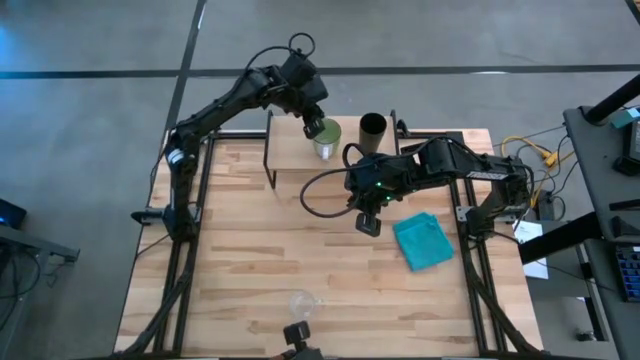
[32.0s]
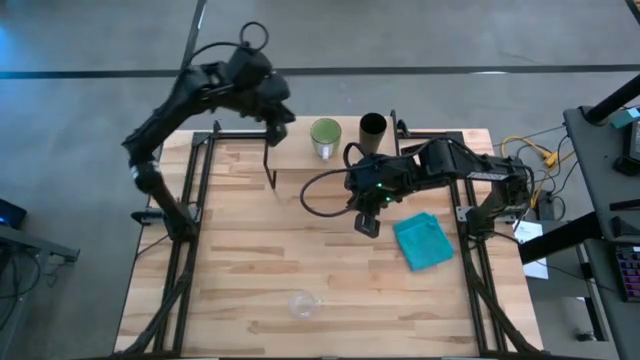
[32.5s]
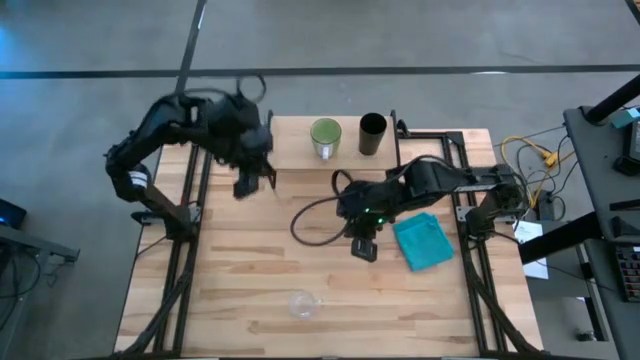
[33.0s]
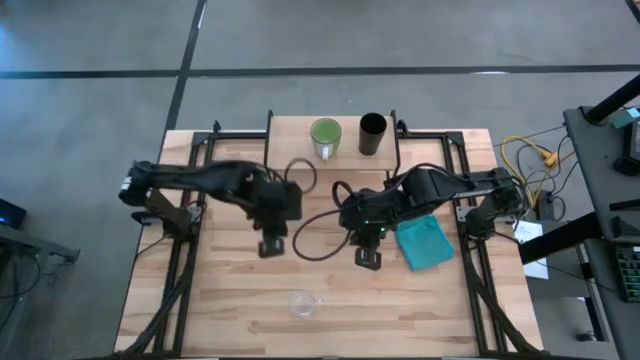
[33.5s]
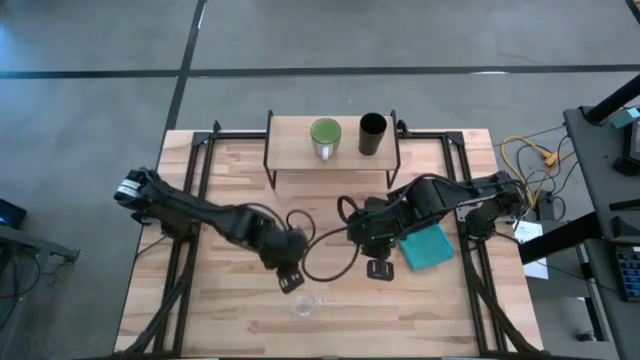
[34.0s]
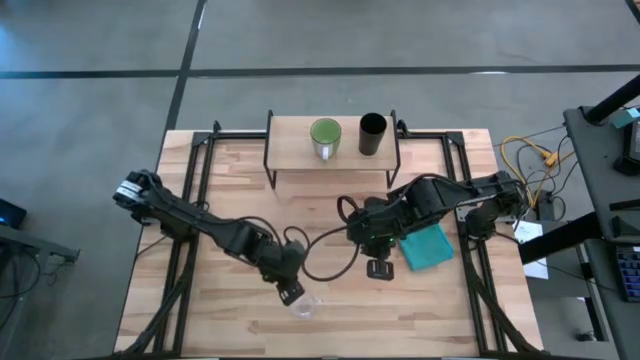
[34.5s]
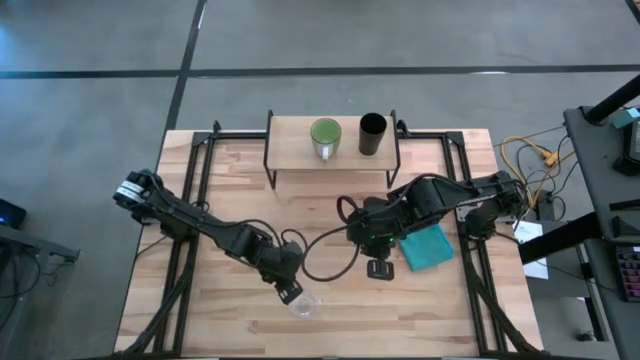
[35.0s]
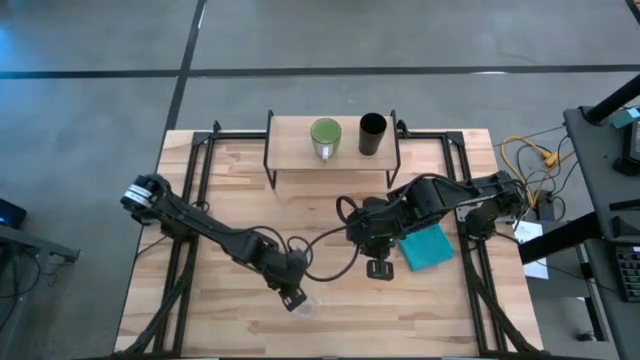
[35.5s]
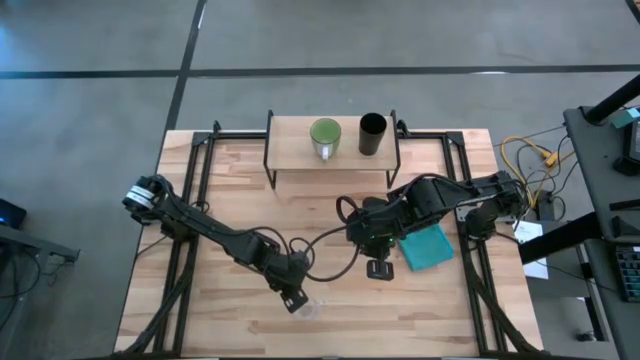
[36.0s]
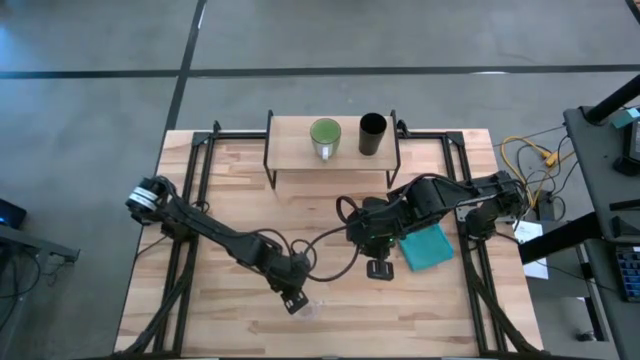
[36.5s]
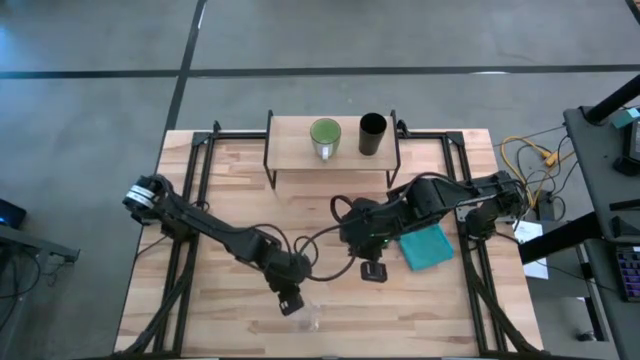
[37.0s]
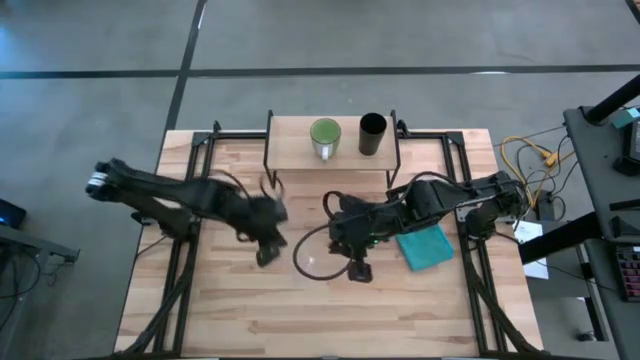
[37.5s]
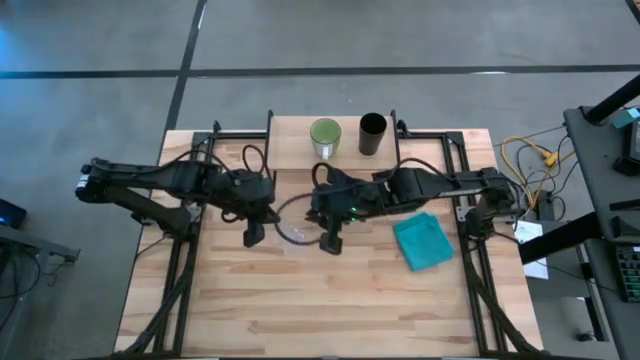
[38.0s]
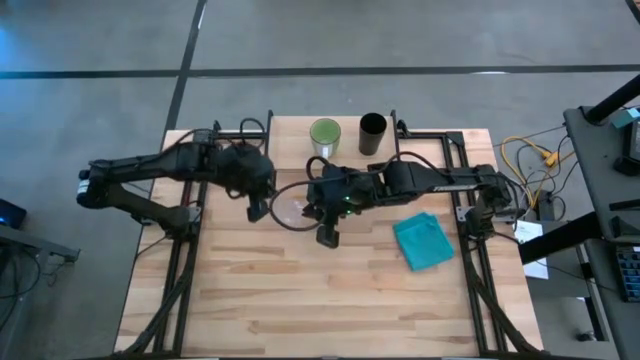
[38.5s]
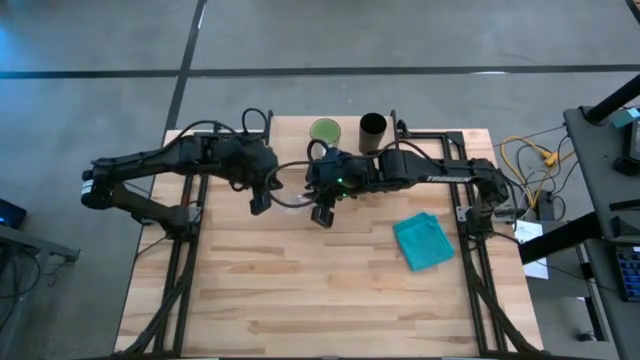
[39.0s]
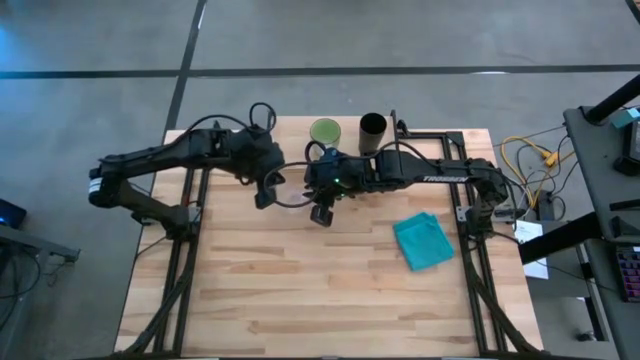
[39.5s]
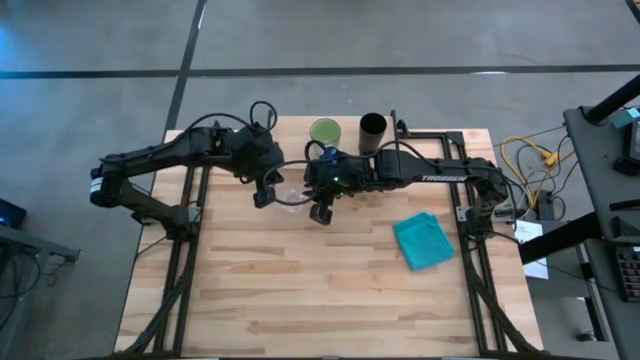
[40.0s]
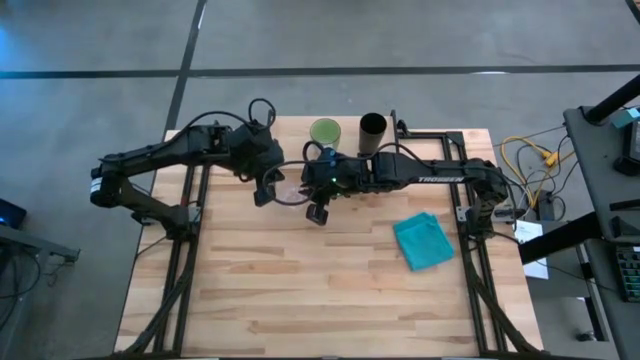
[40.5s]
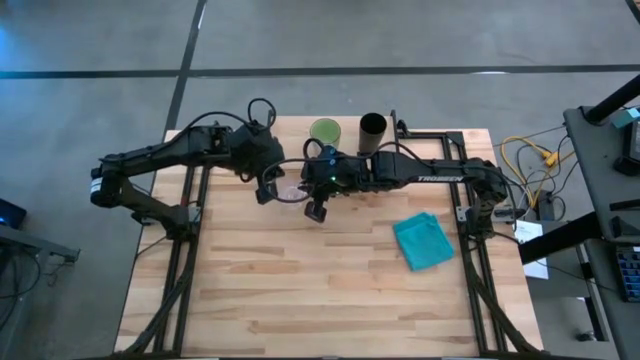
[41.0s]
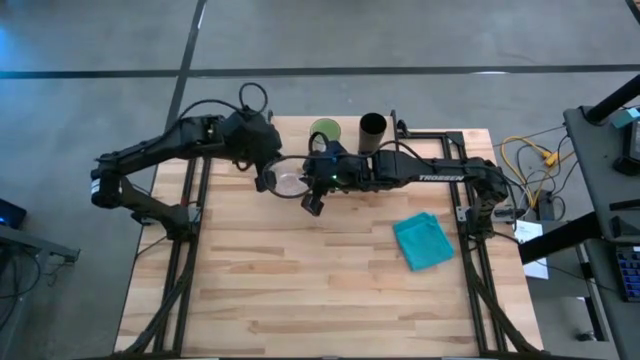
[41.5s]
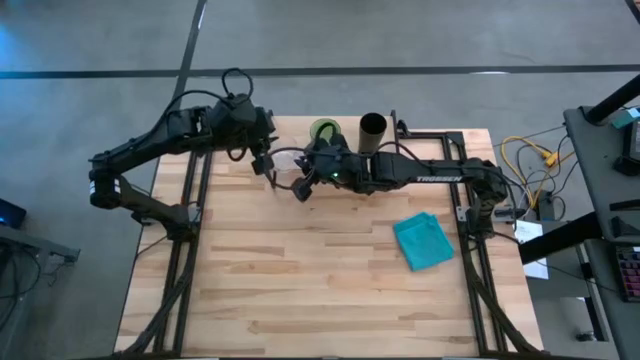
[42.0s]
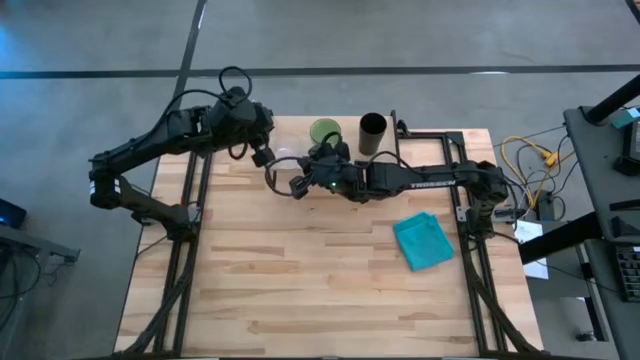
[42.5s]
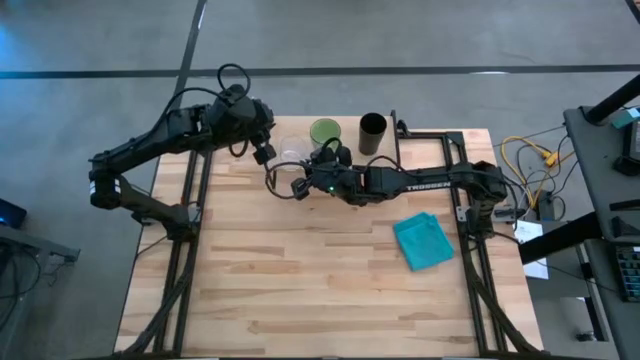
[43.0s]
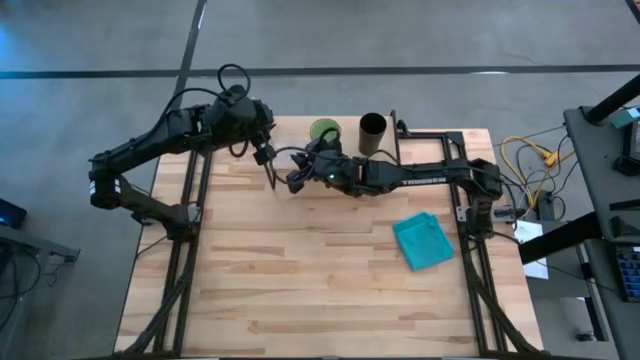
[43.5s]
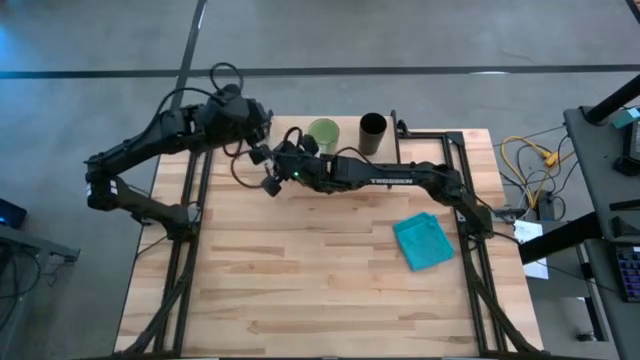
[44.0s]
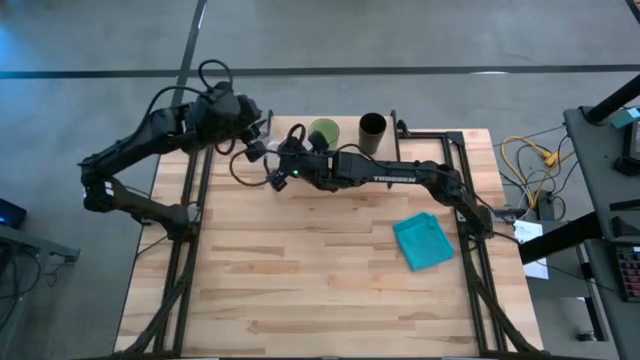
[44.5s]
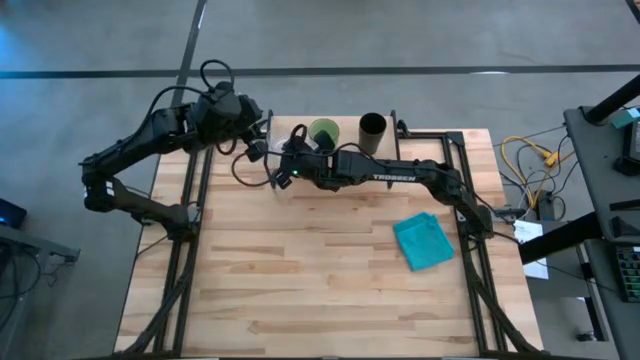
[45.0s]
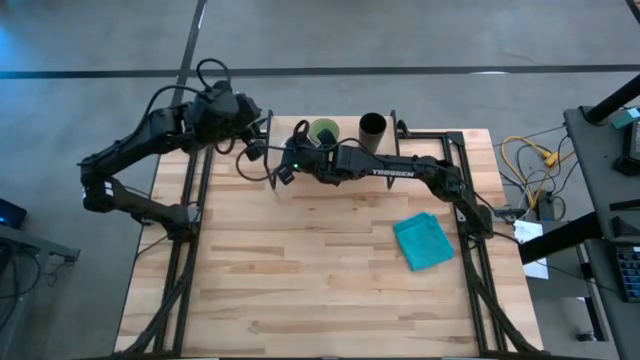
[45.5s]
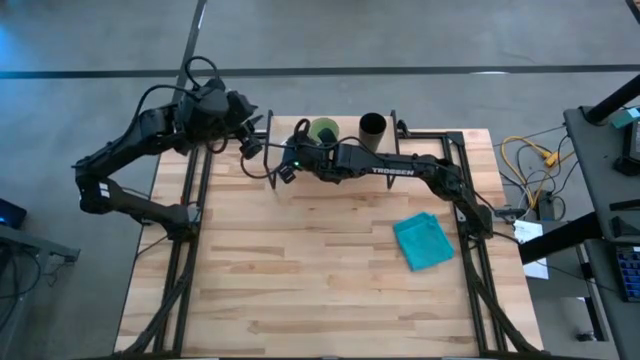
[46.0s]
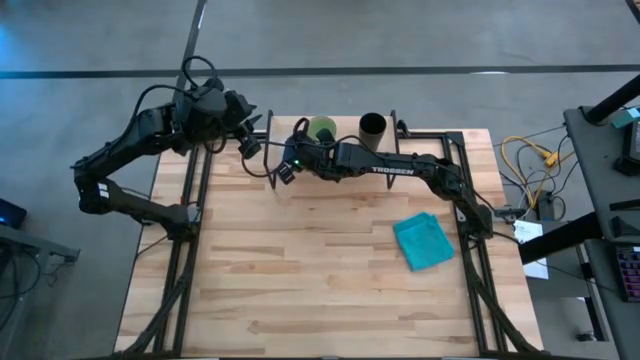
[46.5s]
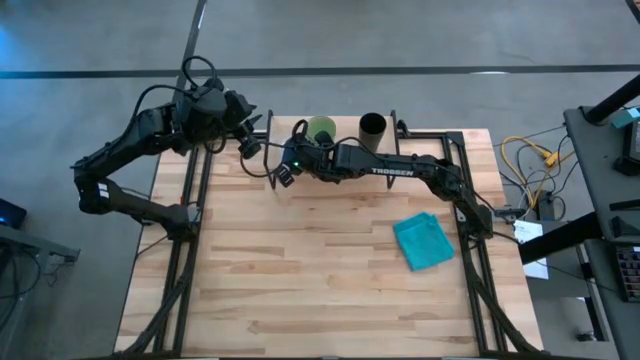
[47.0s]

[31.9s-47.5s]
Task: Stack small to large cups/mugs on shelf
Put the transparent mug on the shelf

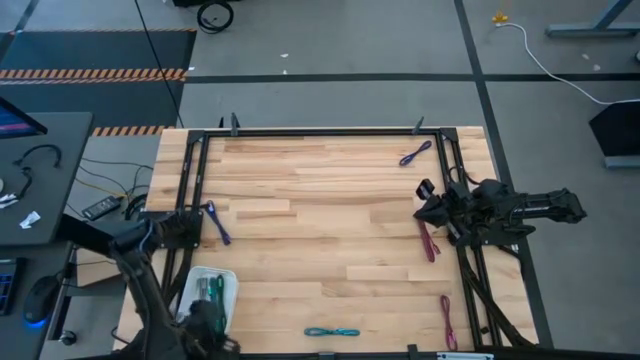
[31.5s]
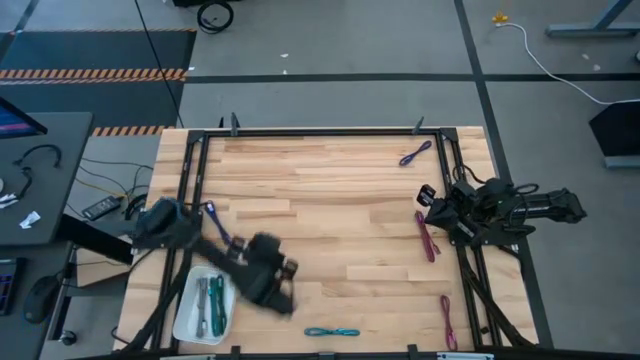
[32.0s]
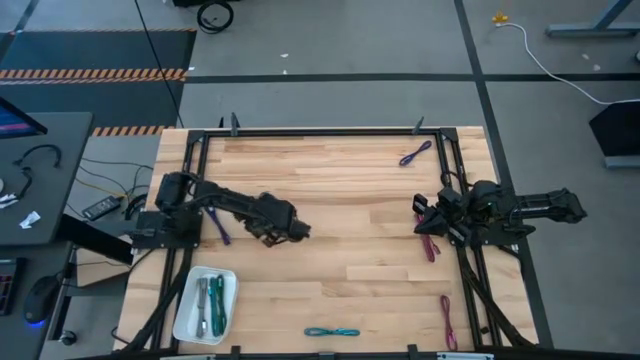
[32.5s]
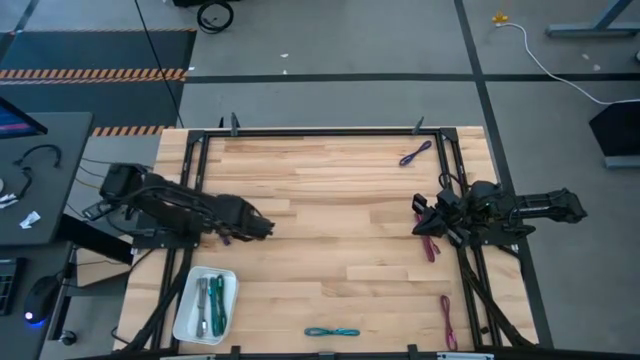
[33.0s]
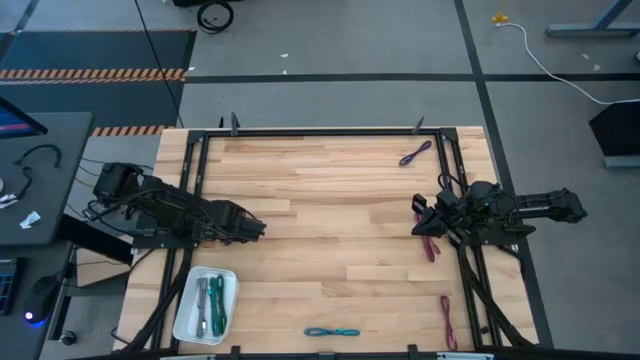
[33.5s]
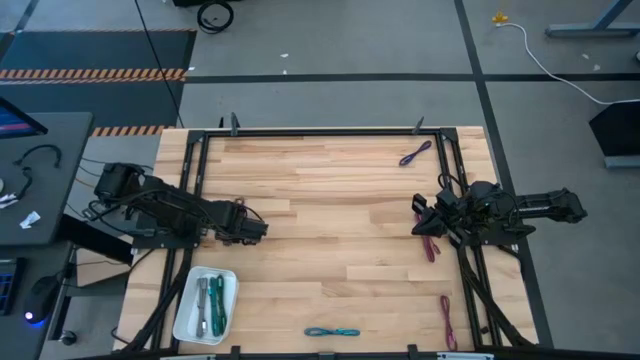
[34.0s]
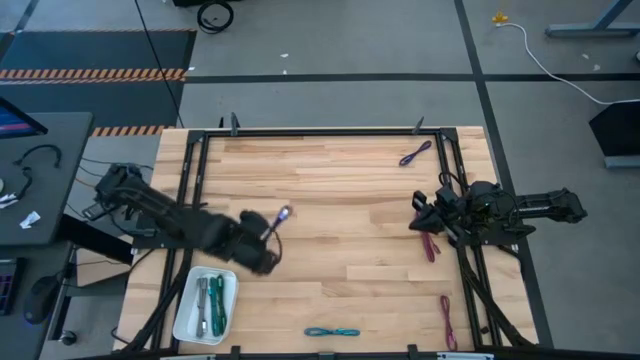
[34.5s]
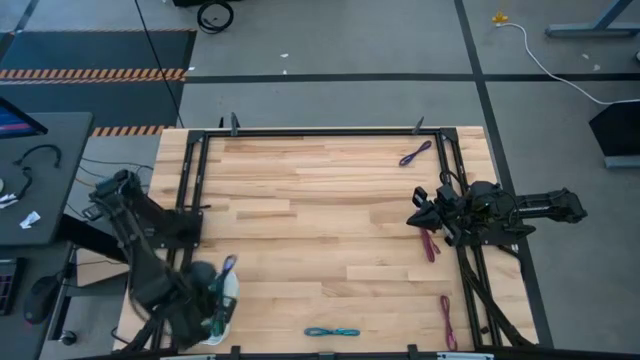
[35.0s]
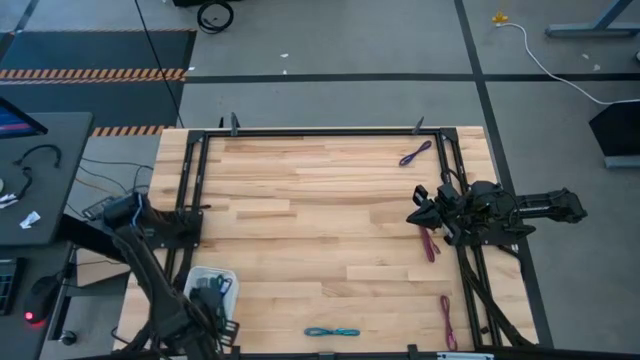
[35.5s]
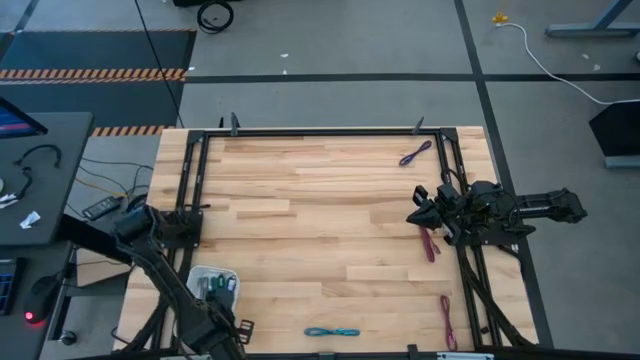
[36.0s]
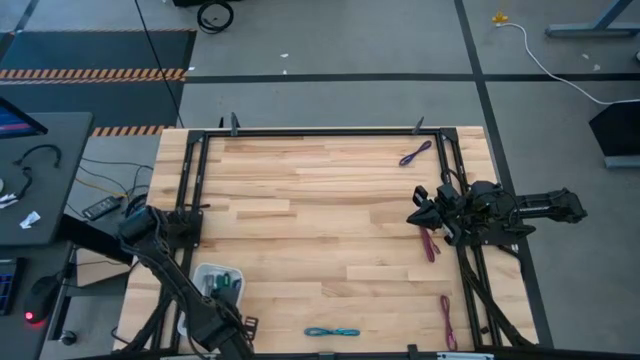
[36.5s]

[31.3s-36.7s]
Task: Pick and place USB-C Cables
Put the bottom purple charger cable into the white bin
